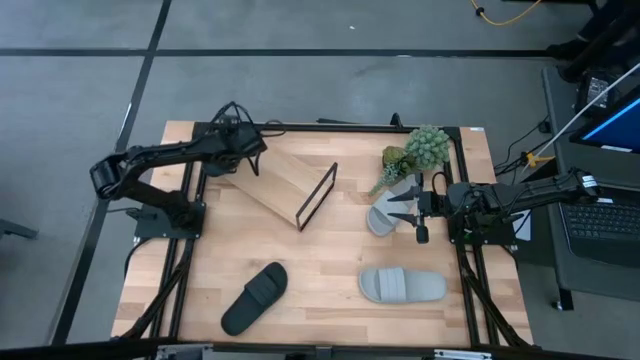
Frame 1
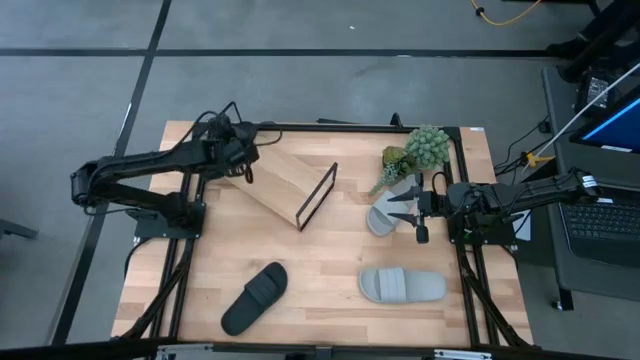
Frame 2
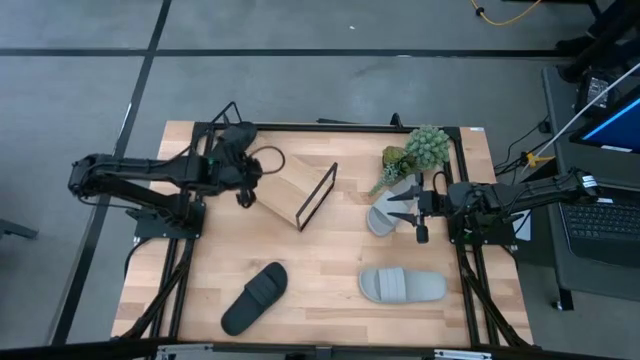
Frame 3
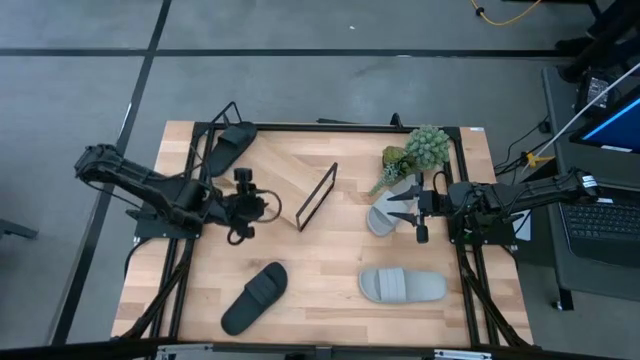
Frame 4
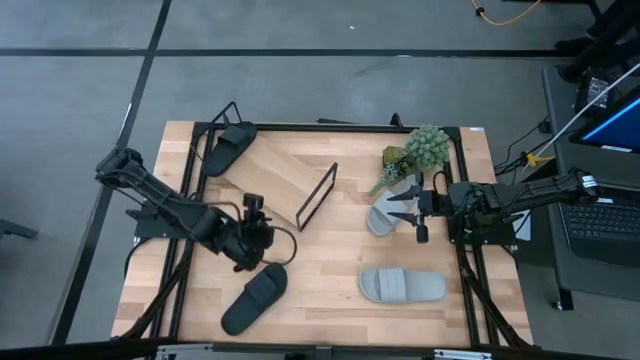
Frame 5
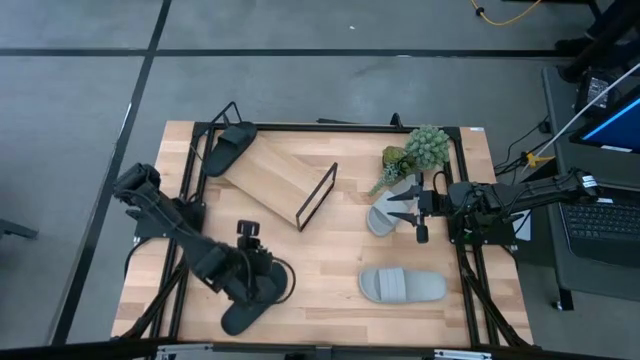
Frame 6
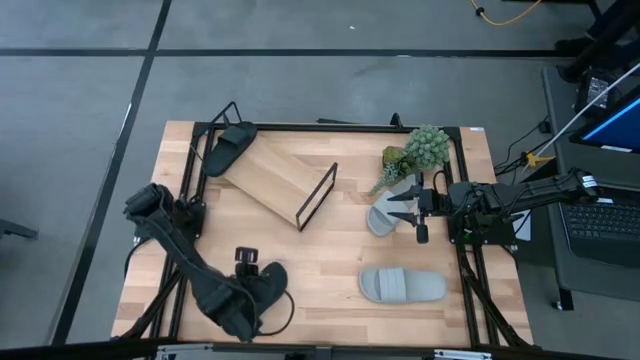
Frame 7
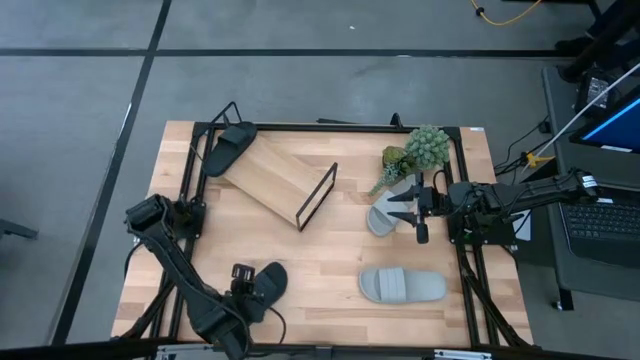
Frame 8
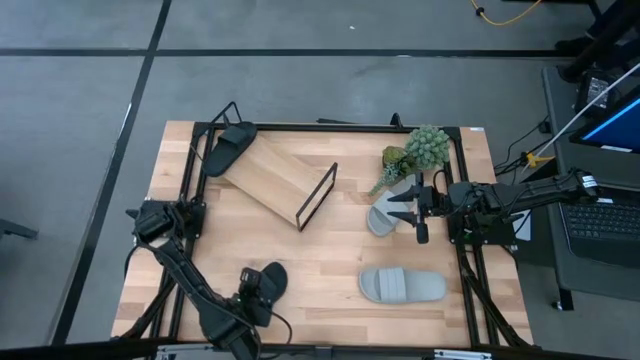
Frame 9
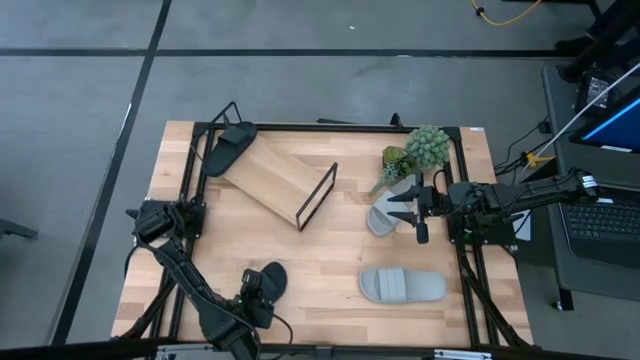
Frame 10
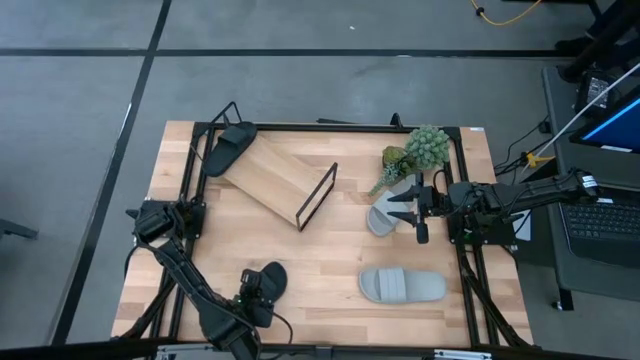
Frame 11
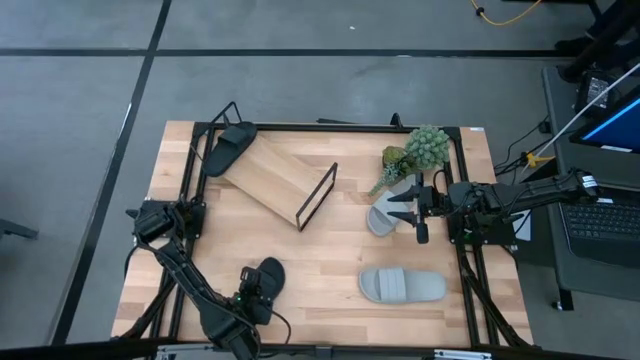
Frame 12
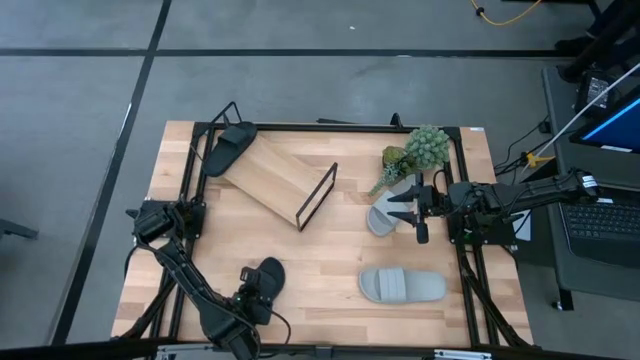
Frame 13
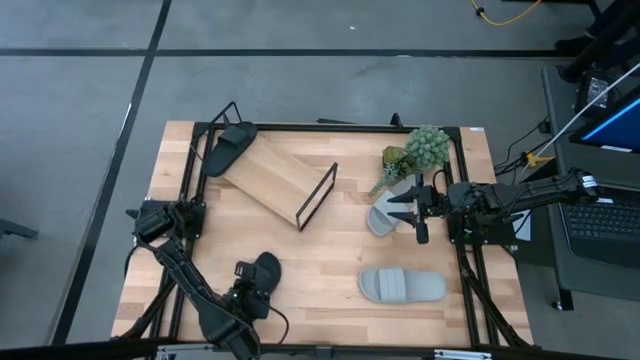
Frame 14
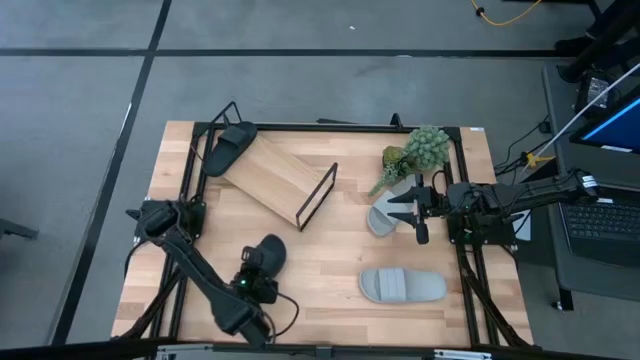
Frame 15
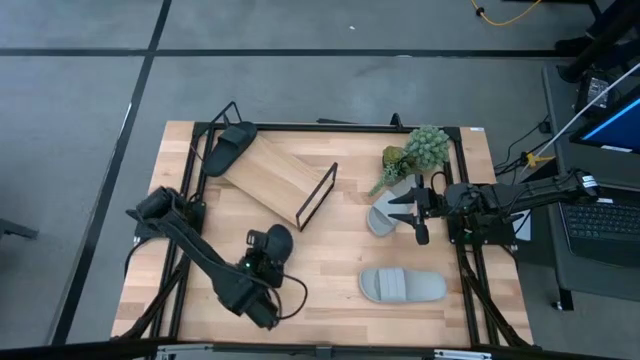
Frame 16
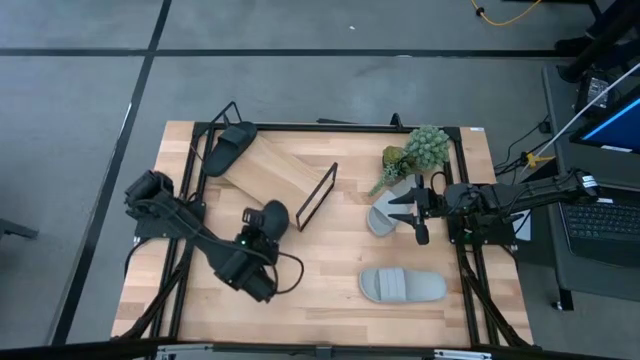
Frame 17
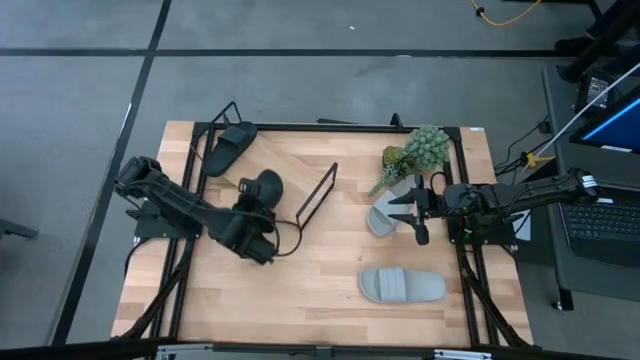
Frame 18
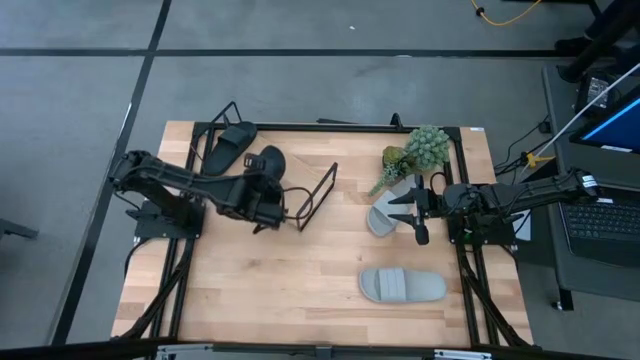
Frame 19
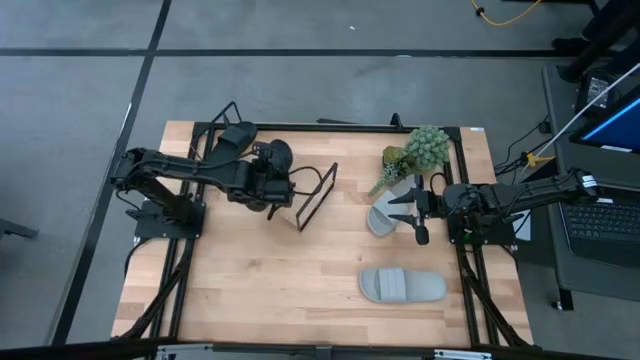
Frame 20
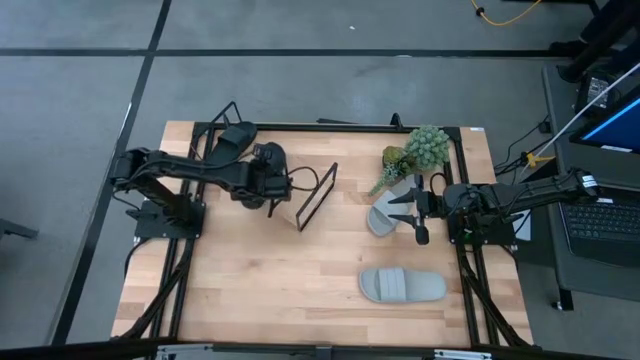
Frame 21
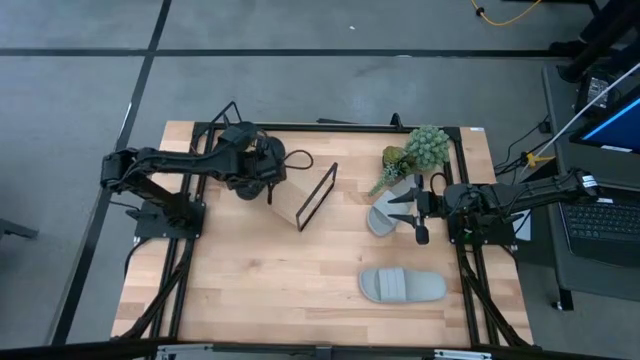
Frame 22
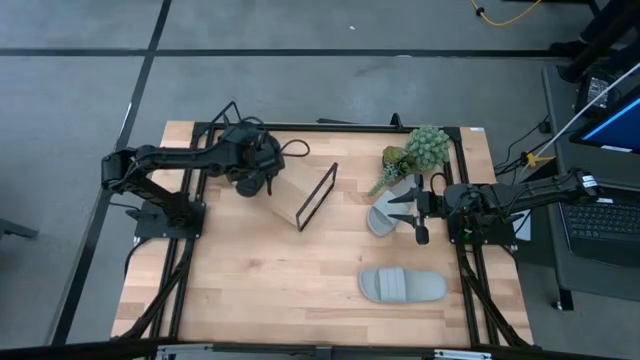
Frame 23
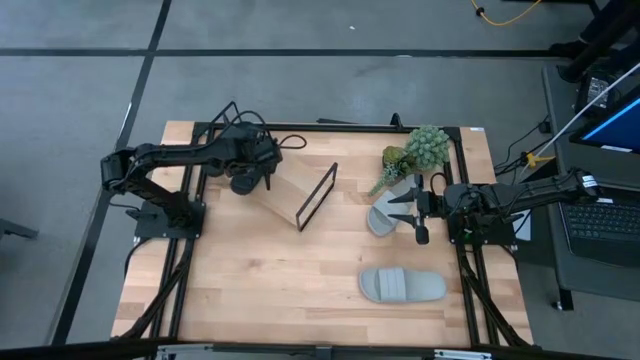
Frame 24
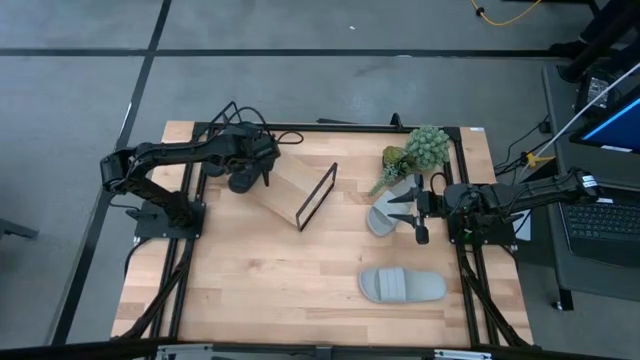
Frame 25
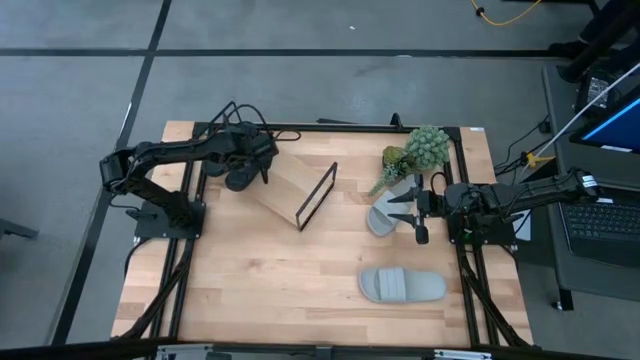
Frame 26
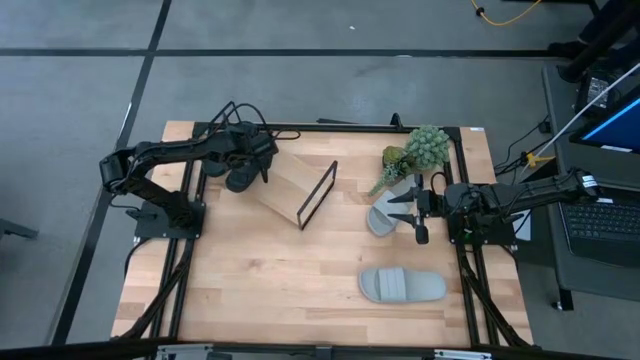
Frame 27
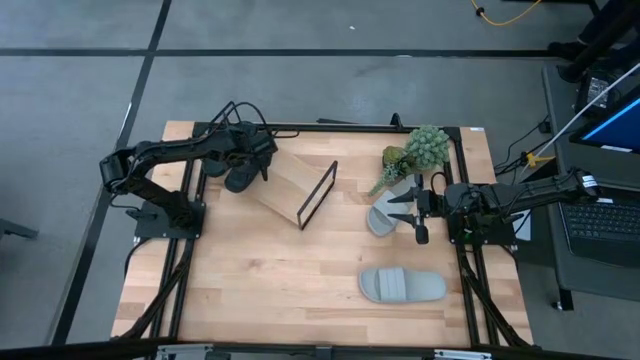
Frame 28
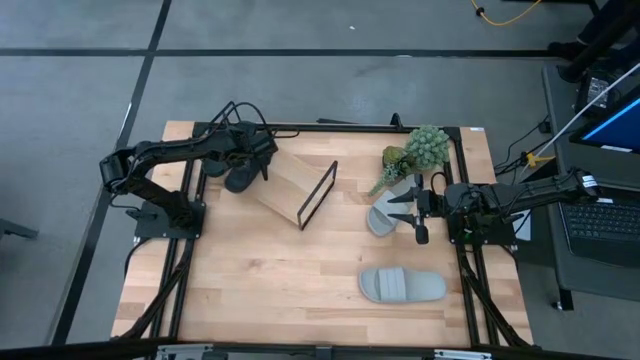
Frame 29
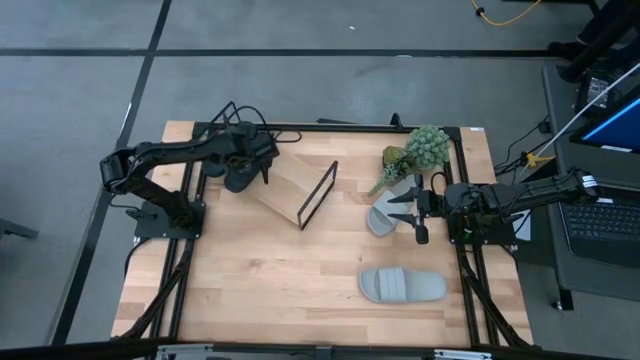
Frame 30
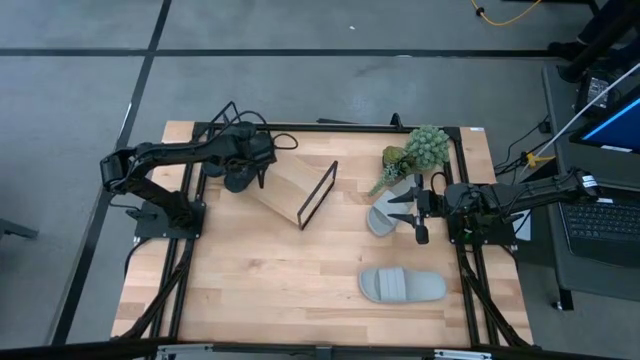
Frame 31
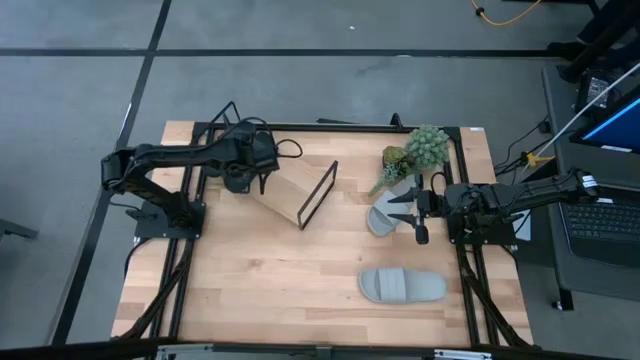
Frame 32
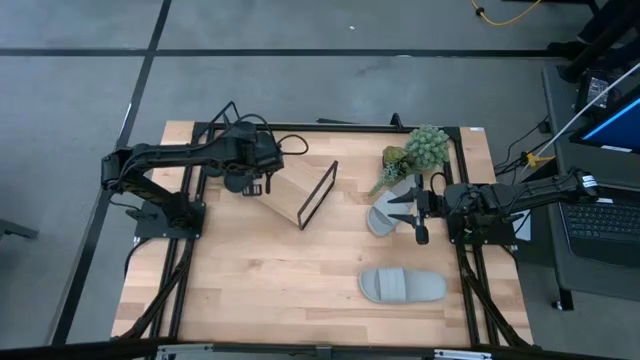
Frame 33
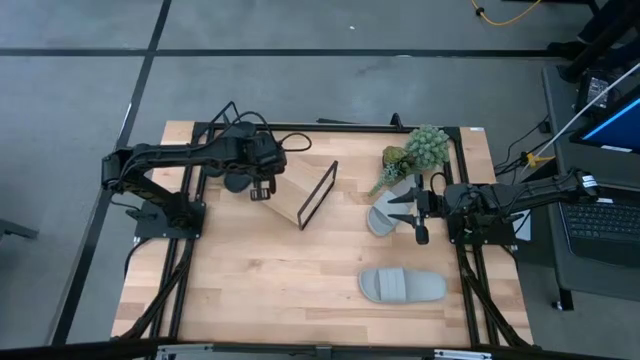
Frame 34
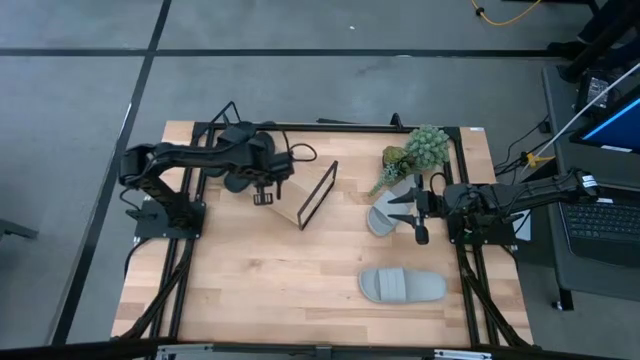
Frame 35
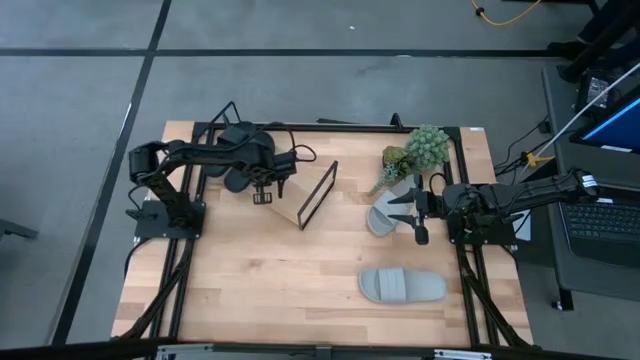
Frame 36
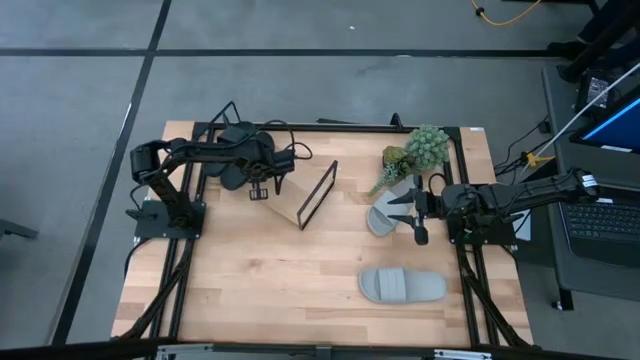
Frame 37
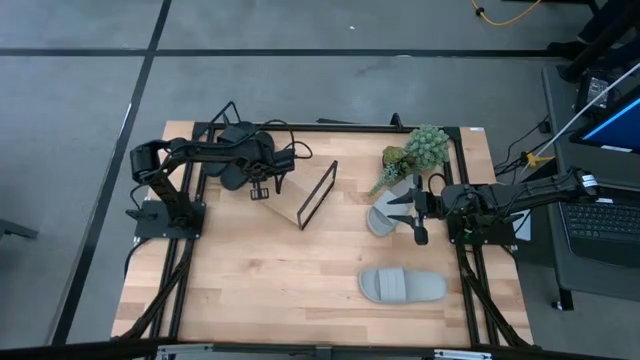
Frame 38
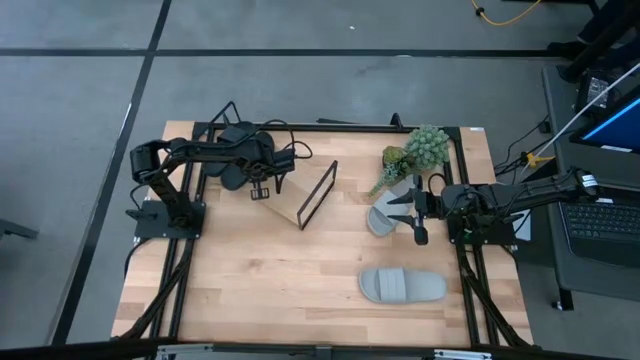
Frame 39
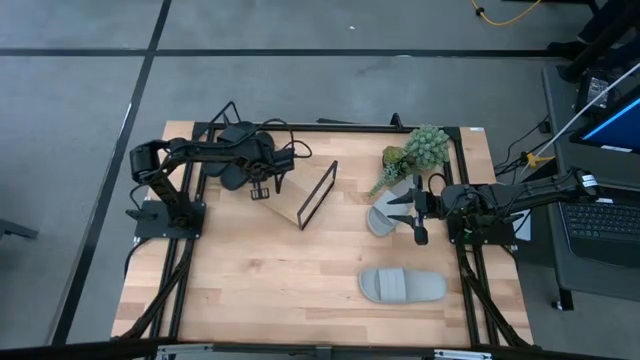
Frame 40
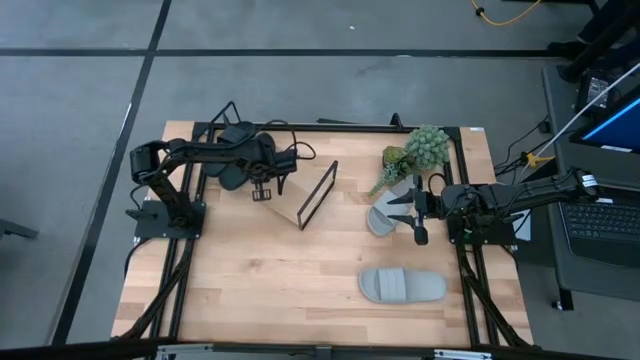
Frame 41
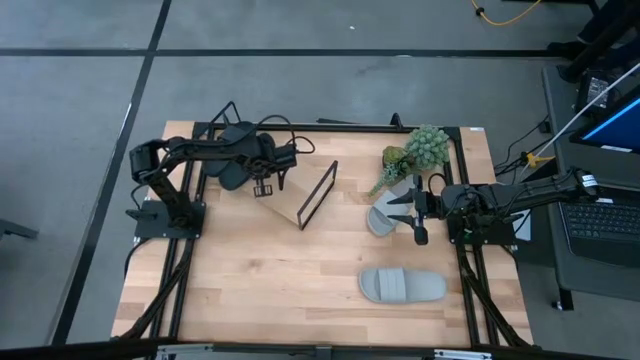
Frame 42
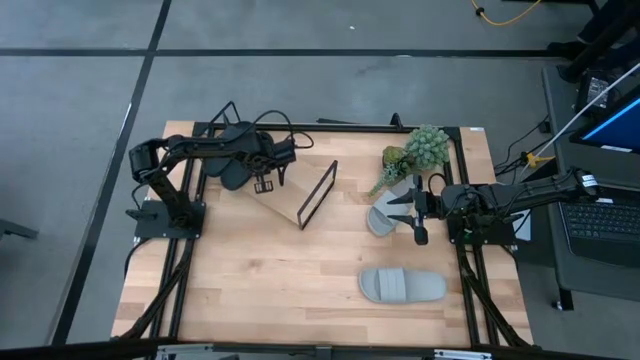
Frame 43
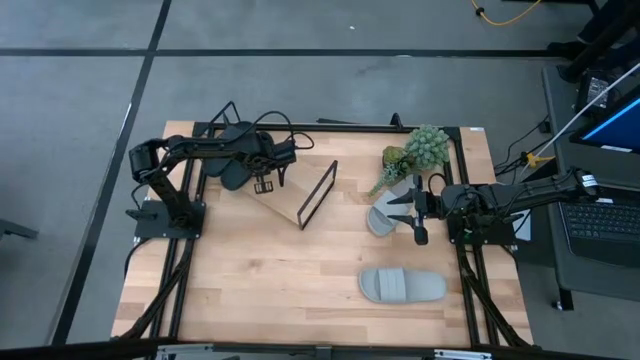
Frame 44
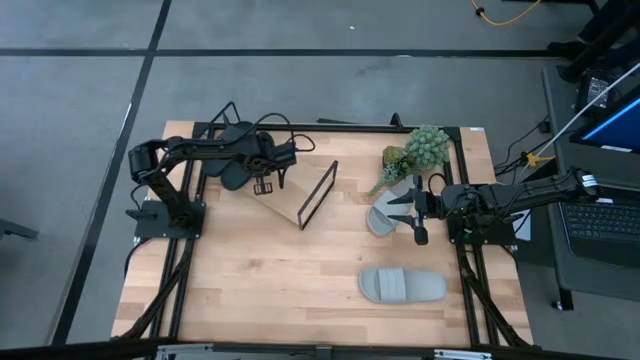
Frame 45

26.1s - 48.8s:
Task: Pick and place slides into the shelf
Put the black slipper on the shelf
